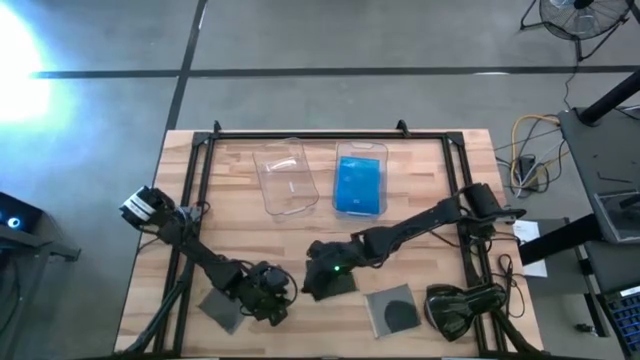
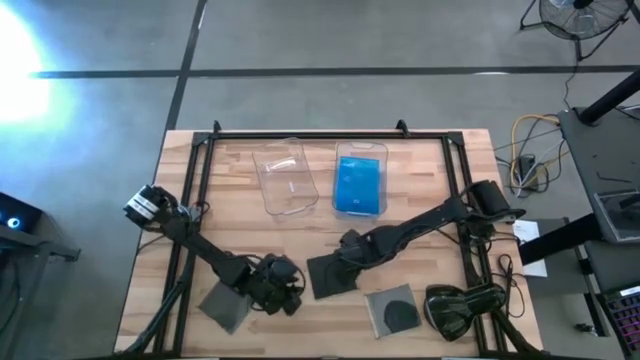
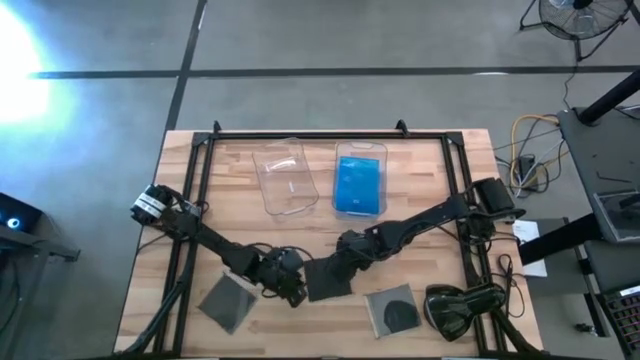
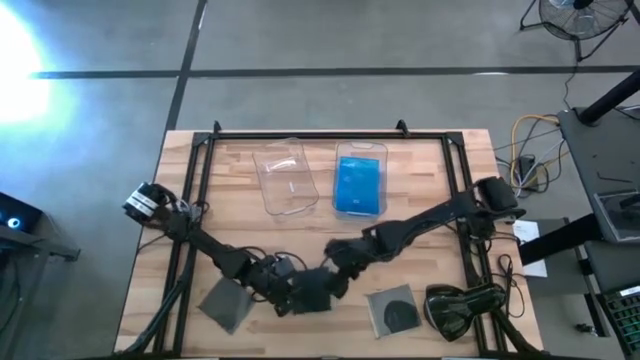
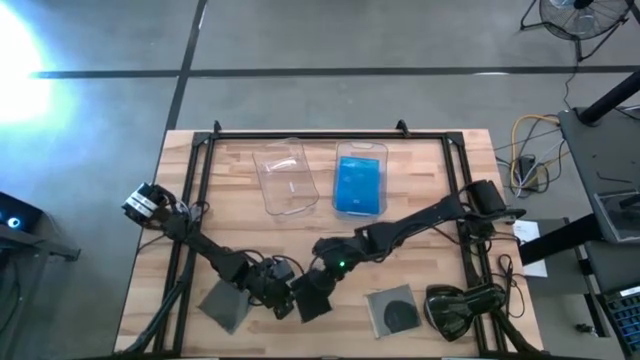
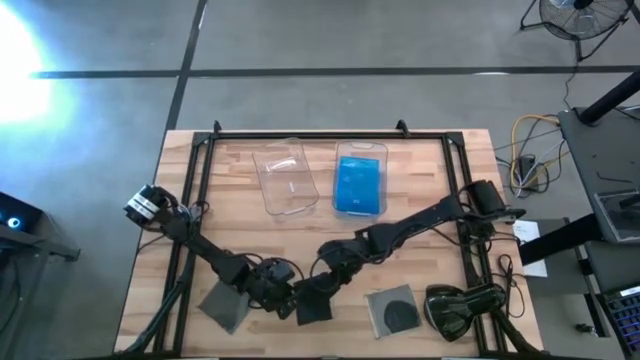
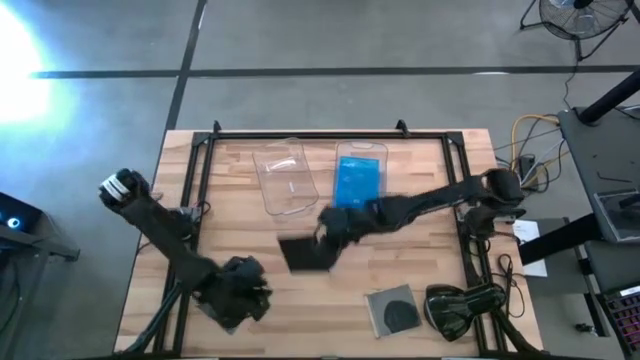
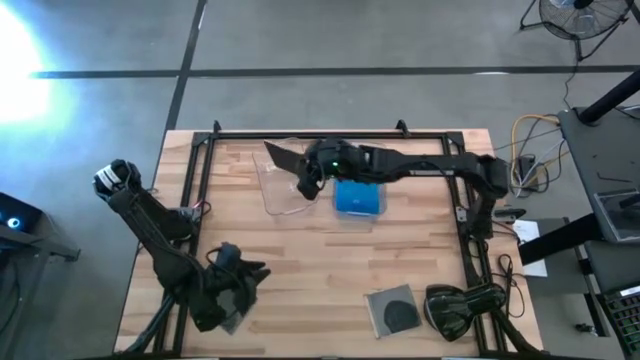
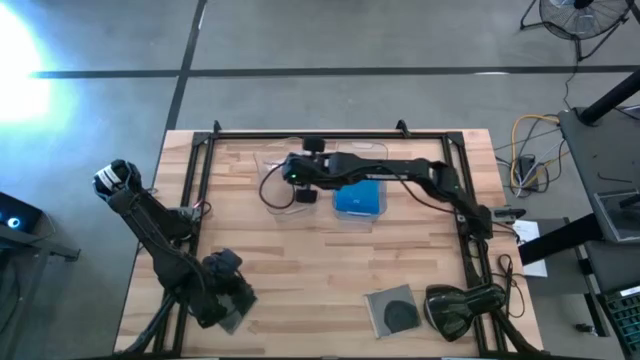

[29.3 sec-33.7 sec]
Task: Pick & place jewel cases by type
Put the middle black CD case into the left transparent bin

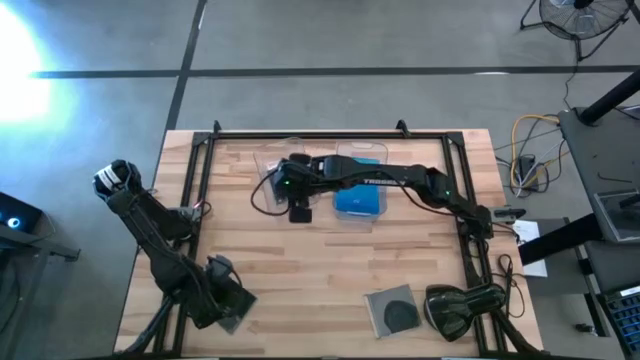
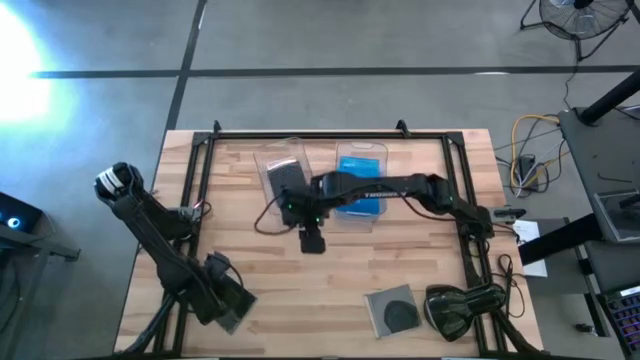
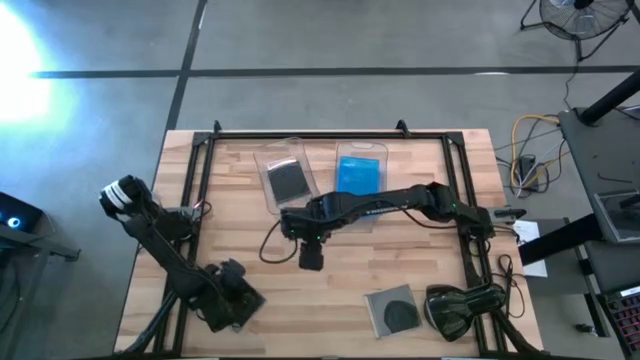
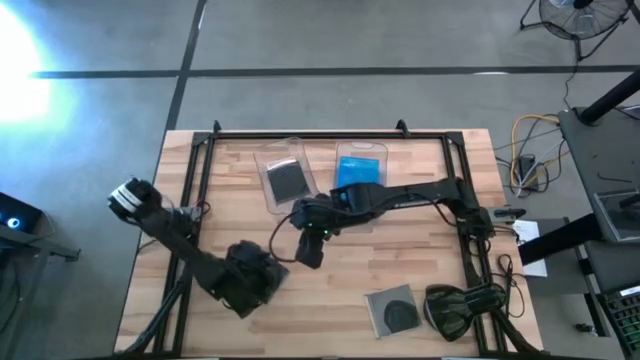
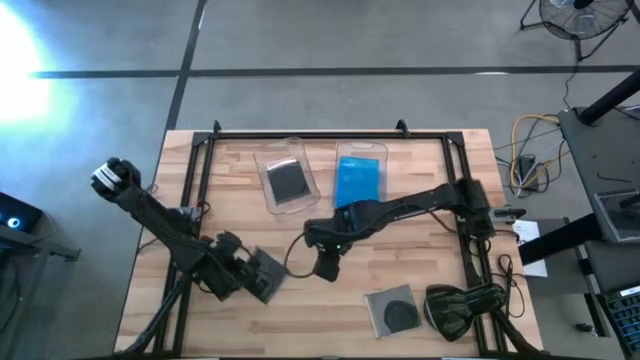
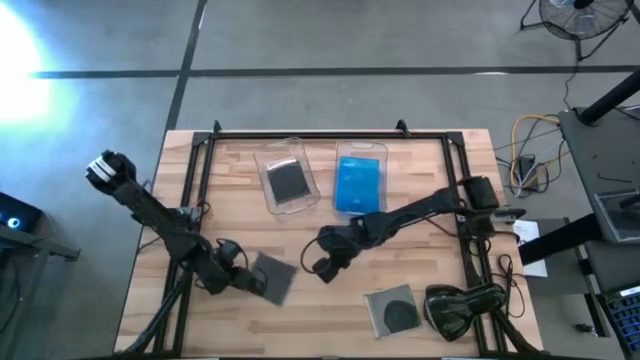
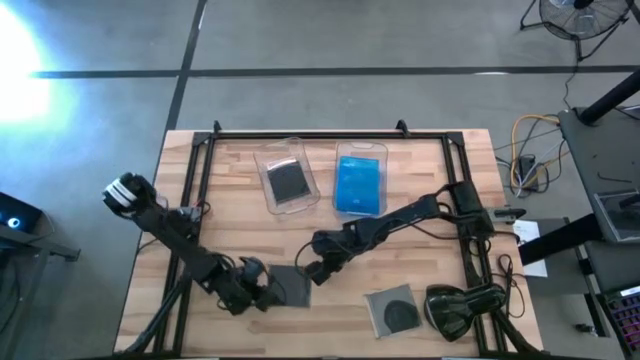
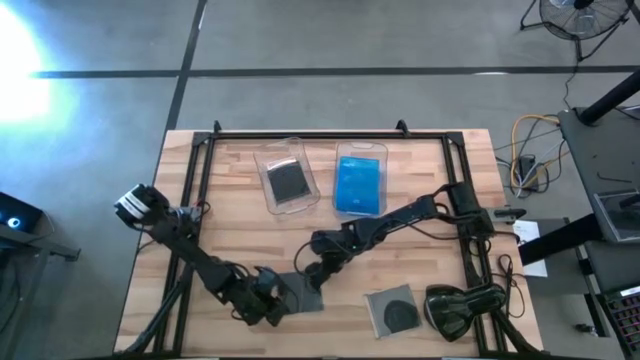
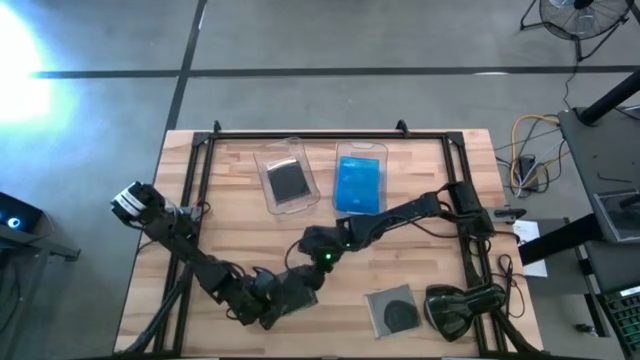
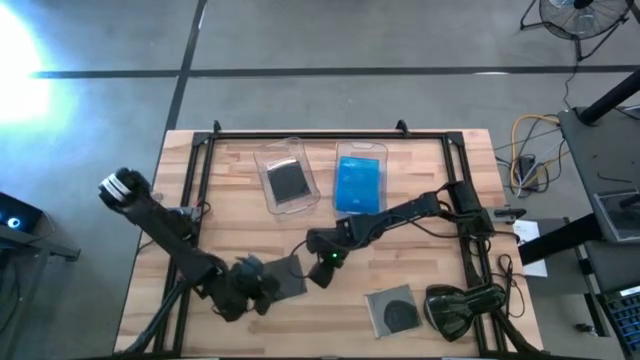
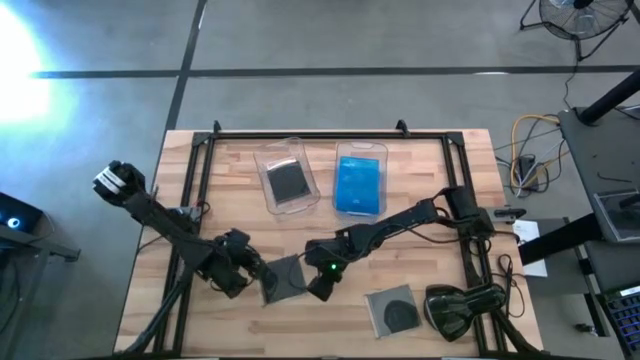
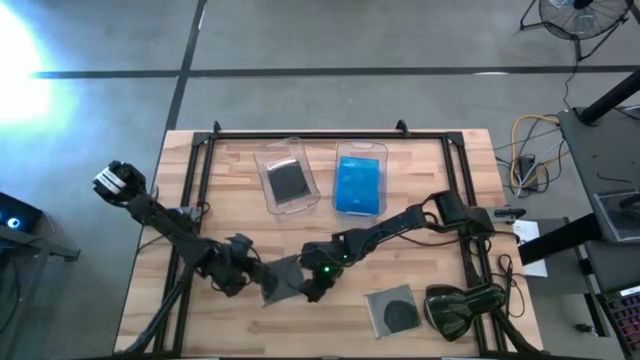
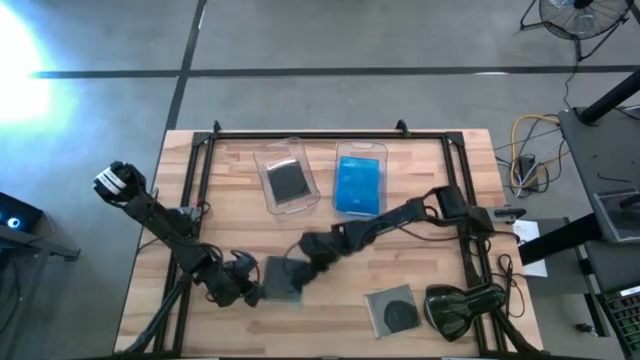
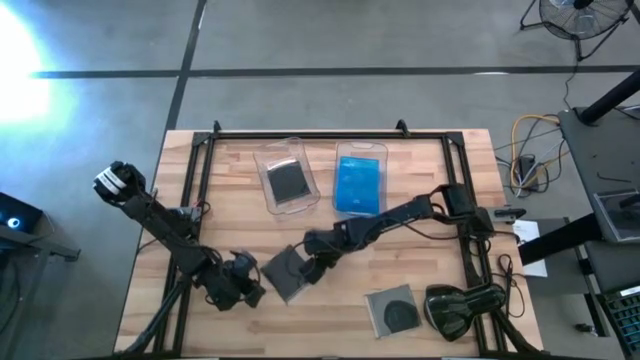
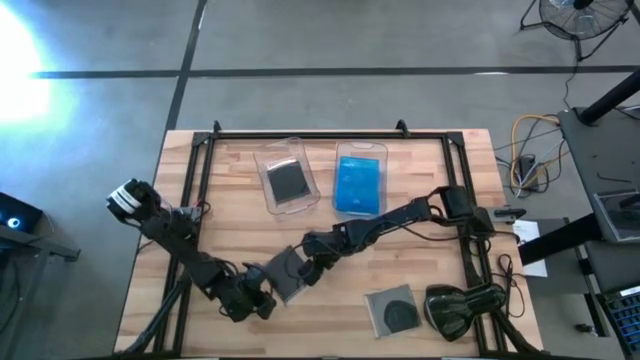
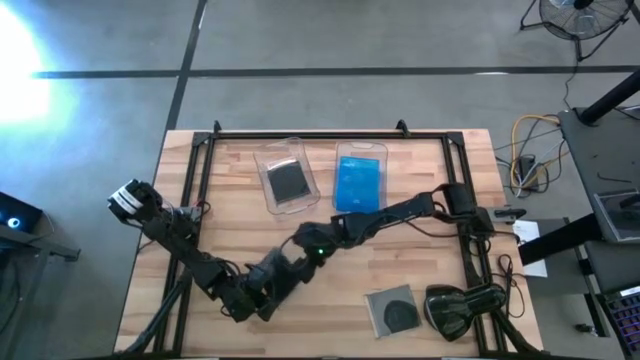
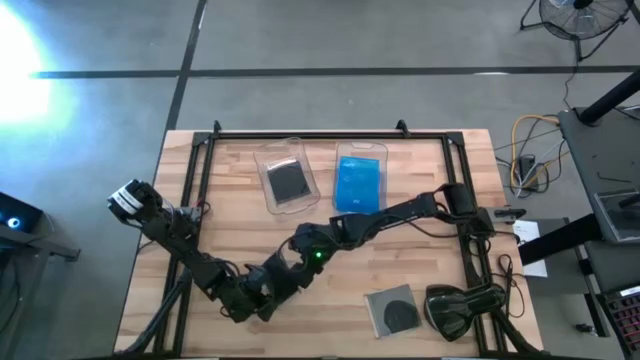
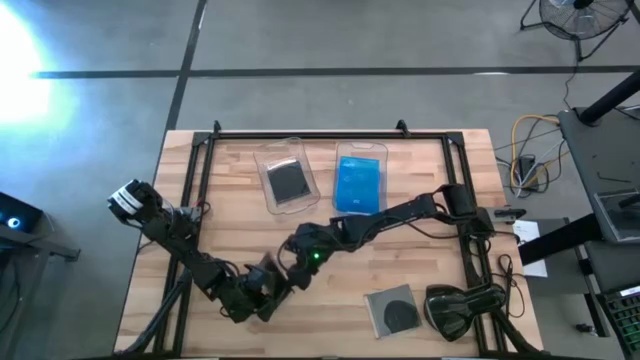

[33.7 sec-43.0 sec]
Put the left black CD case into the left transparent bin

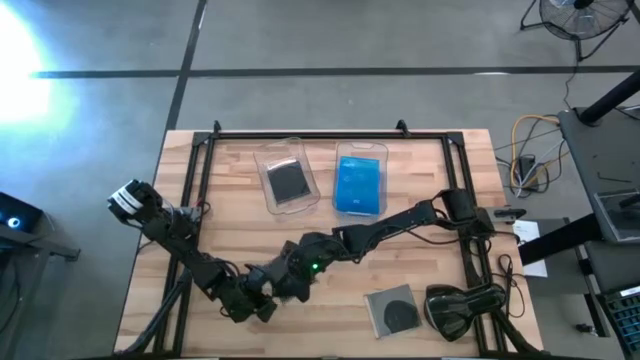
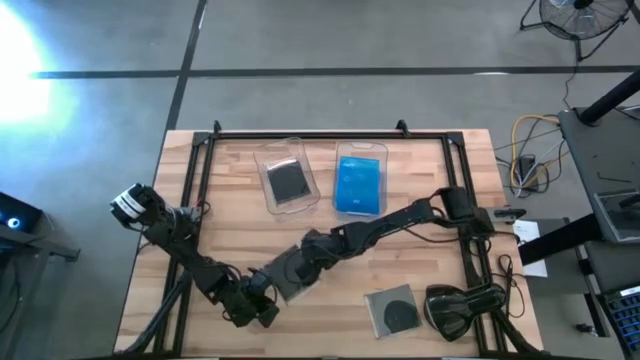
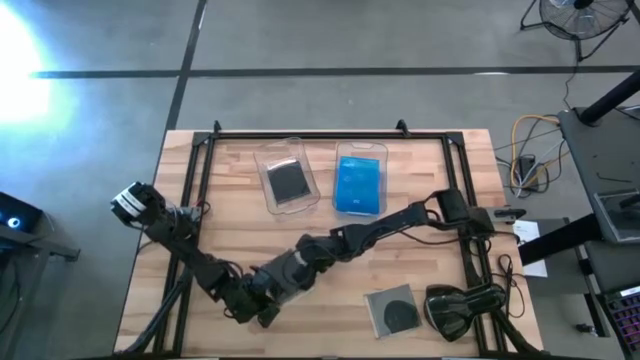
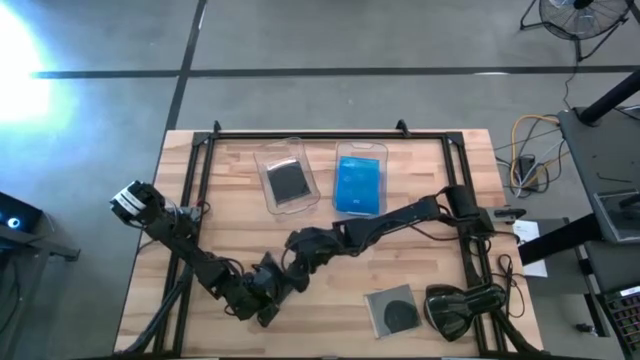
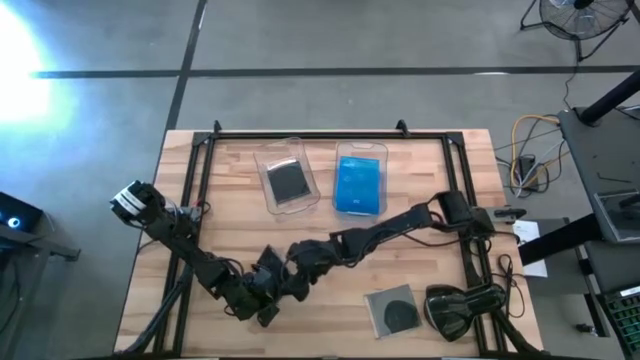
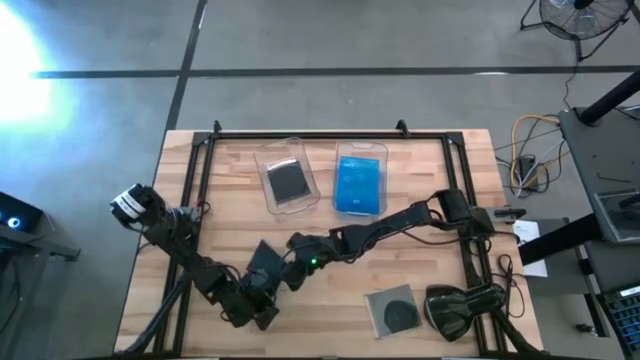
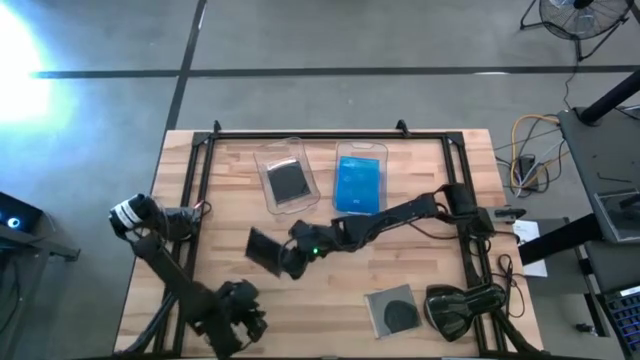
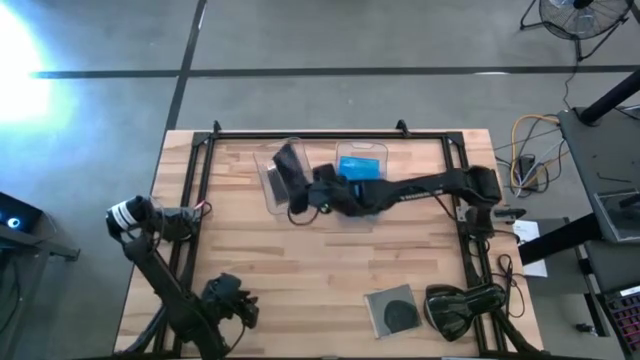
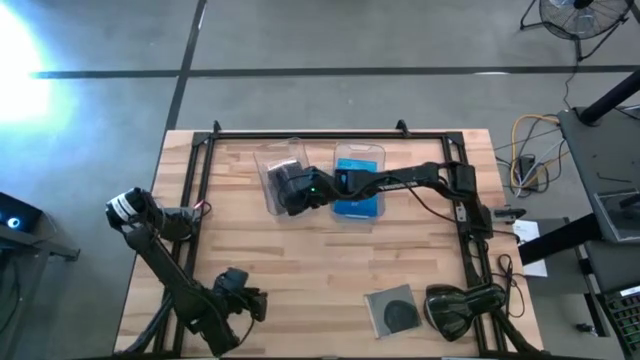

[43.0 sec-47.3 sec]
Put the left black CD case into the left transparent bin

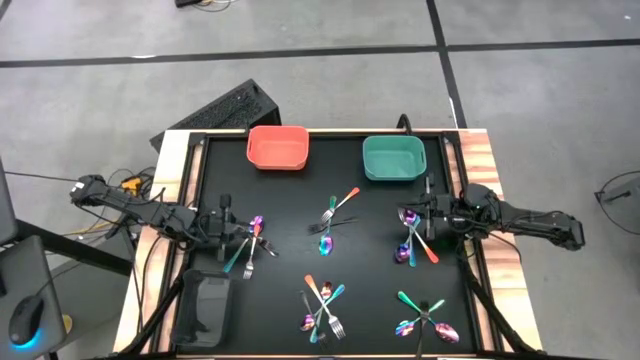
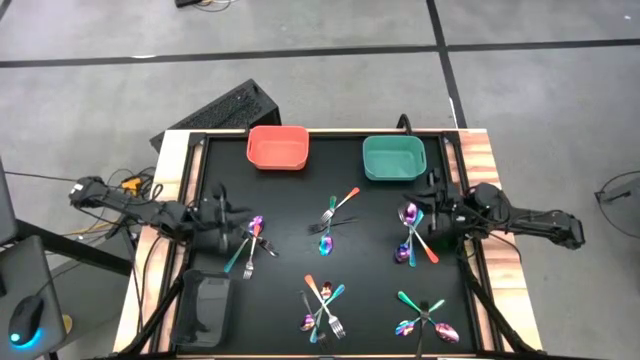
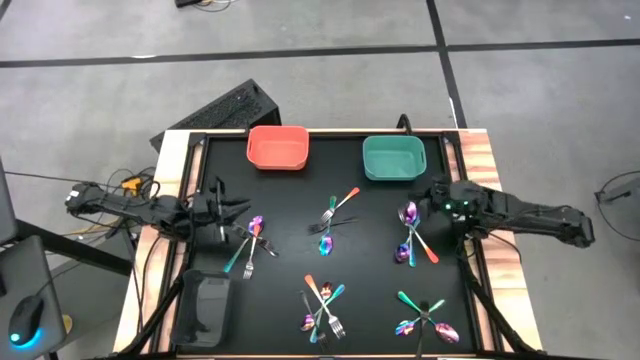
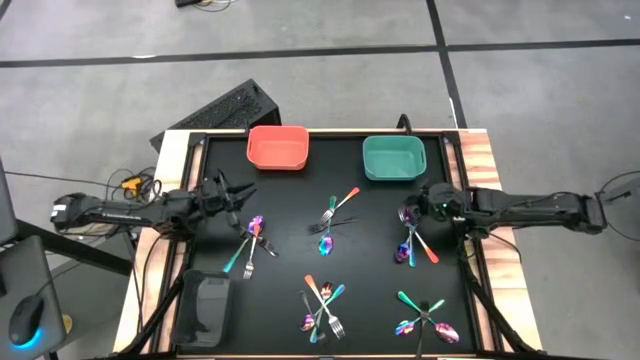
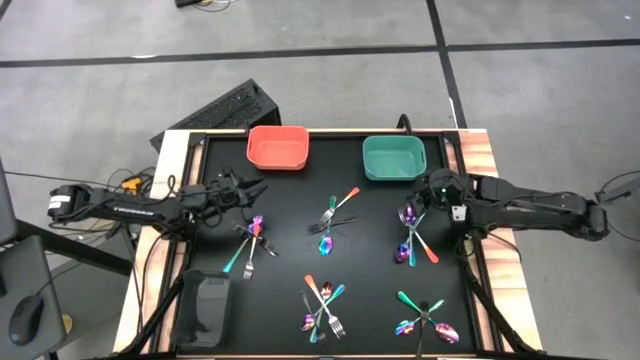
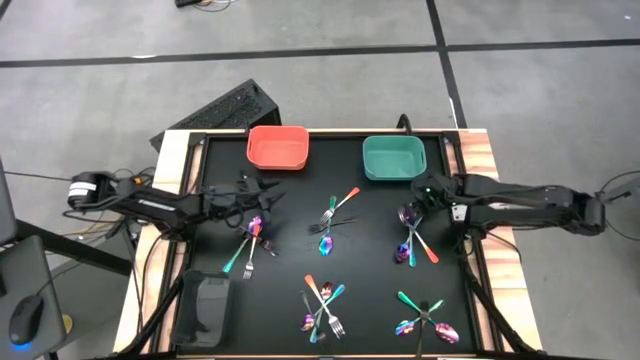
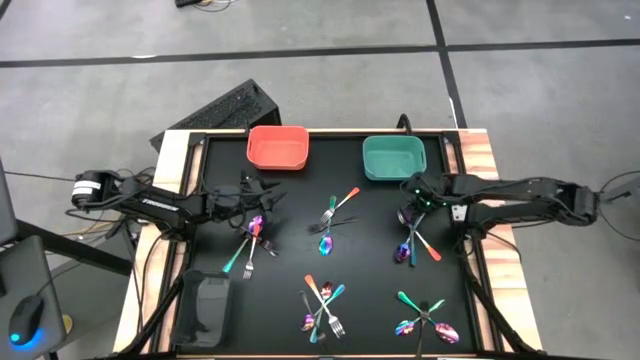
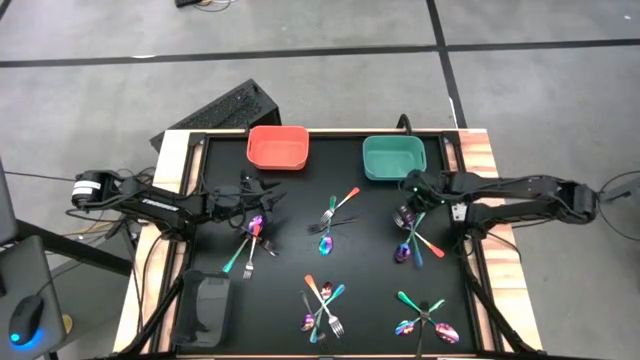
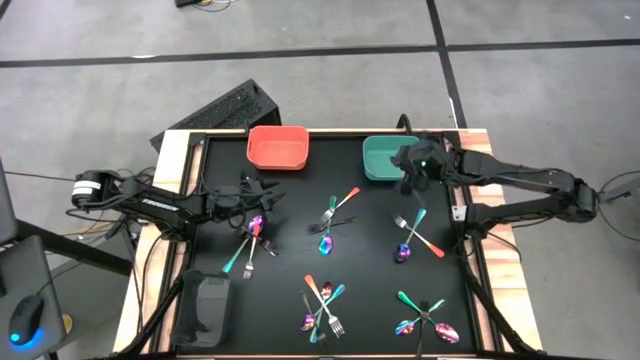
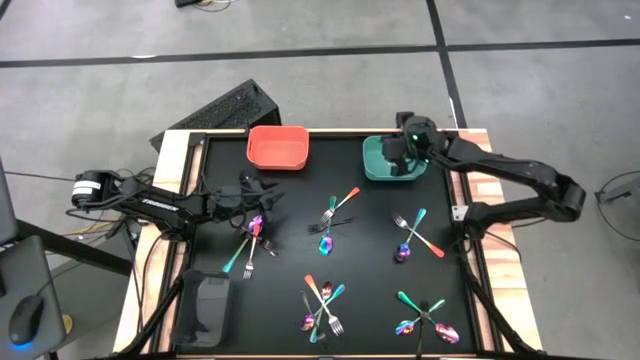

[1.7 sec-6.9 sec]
Task: Sort silverware by color (type)
Put the blue spoon into the blue bin
